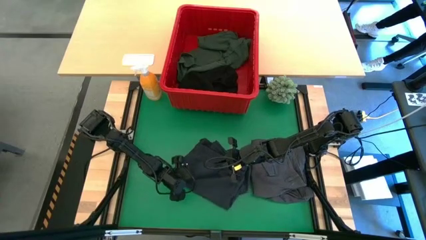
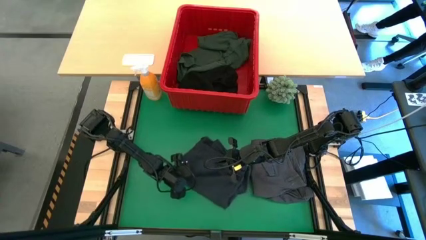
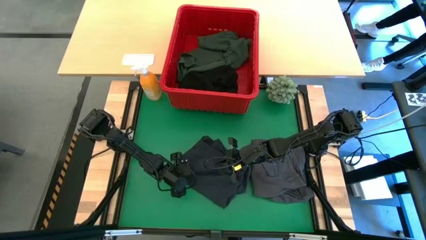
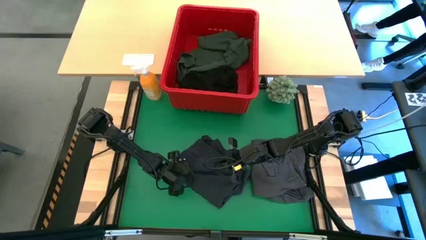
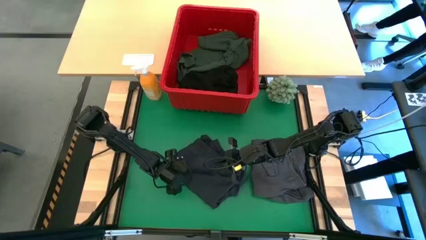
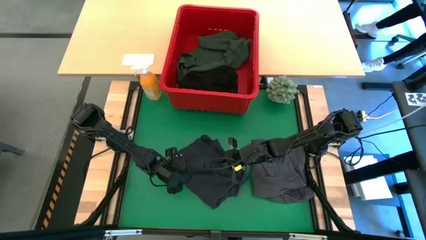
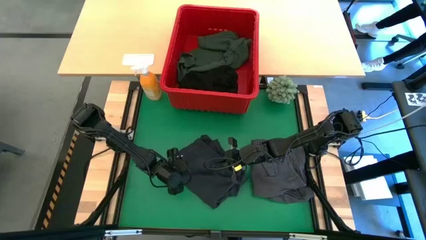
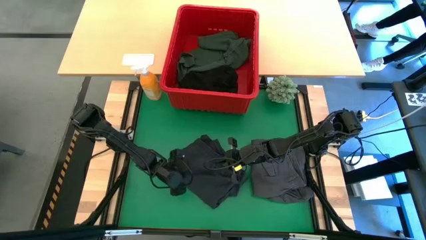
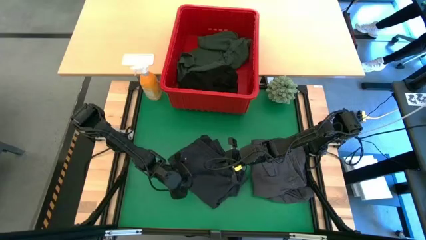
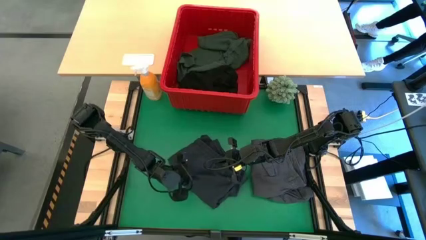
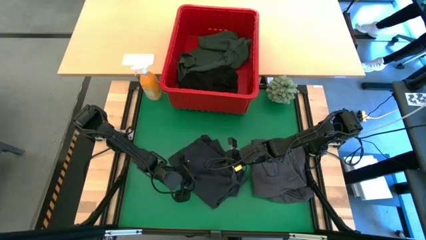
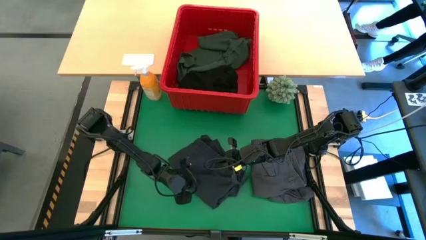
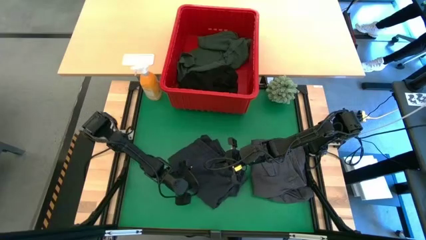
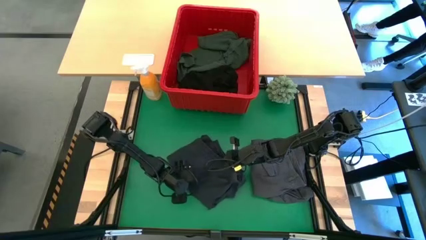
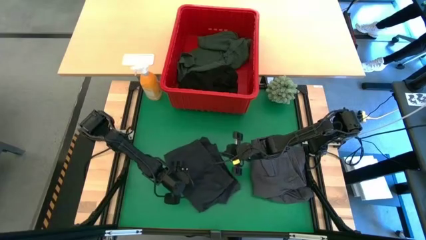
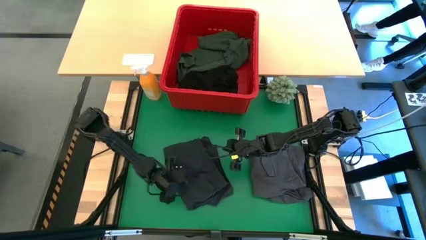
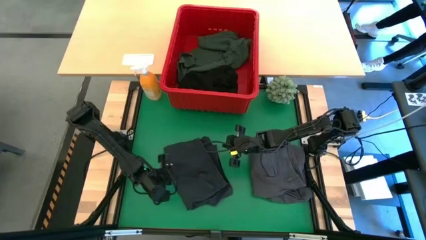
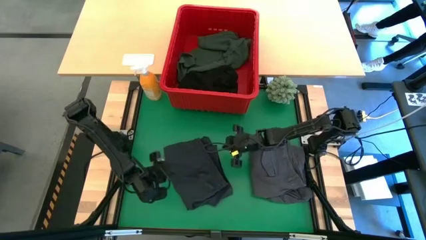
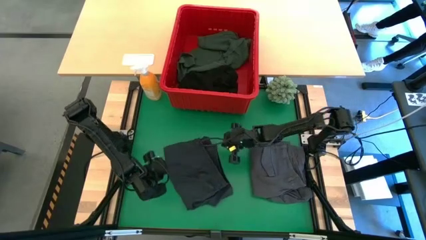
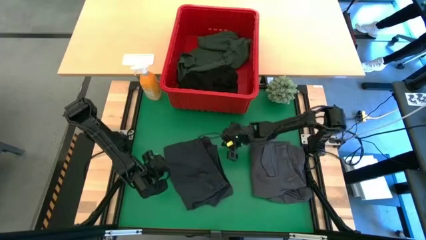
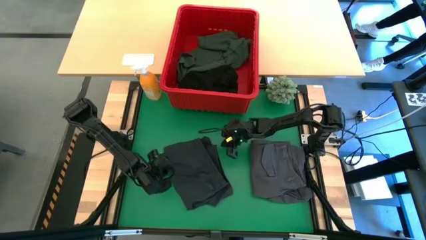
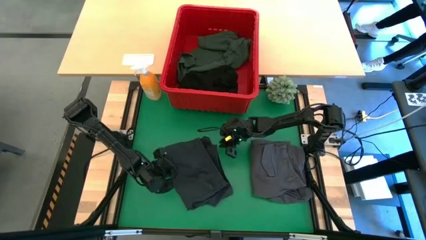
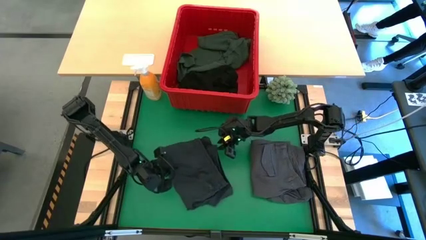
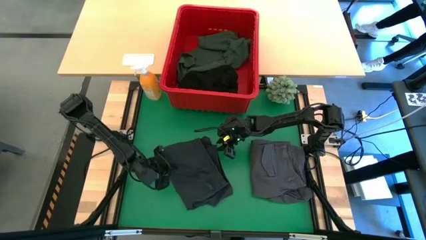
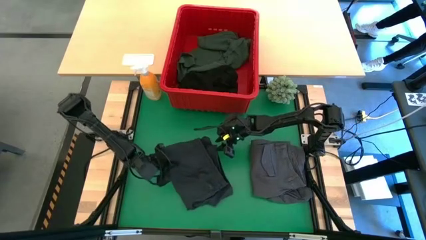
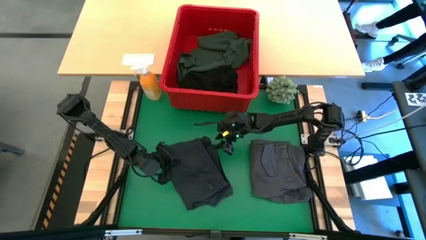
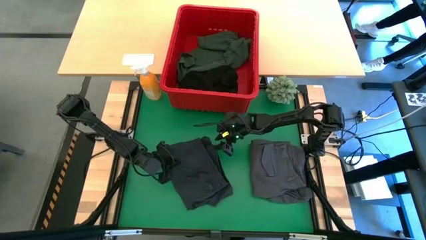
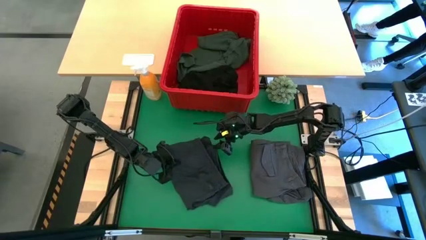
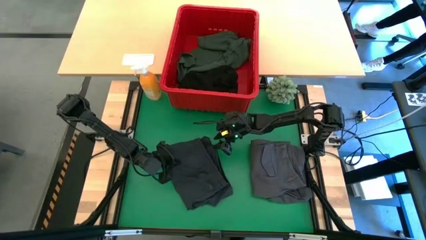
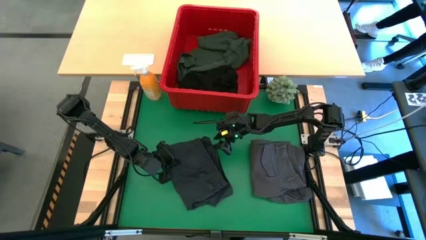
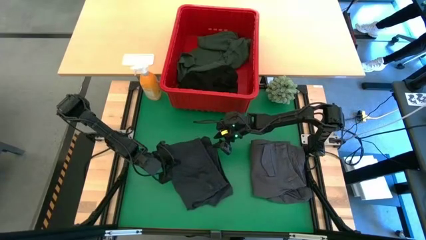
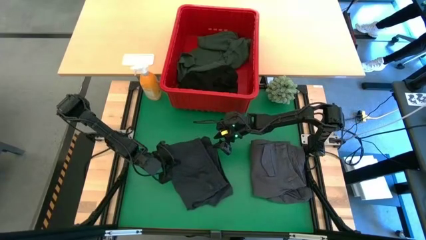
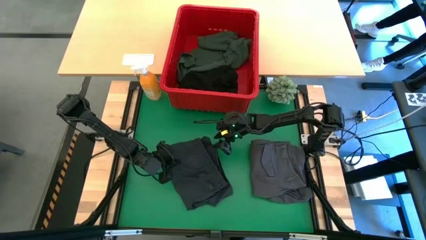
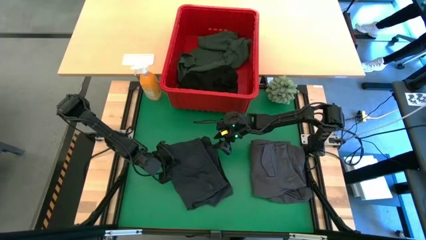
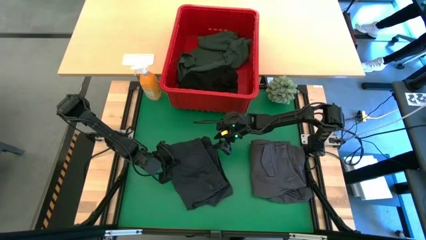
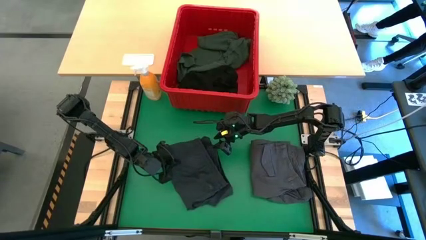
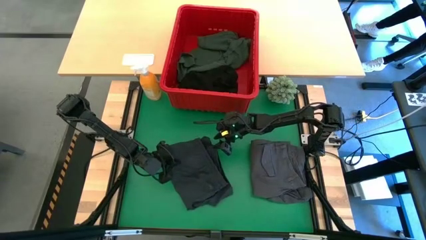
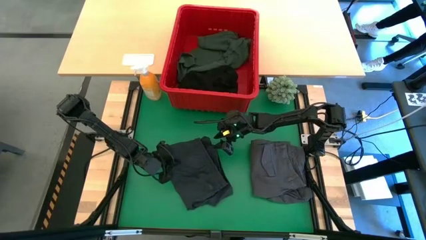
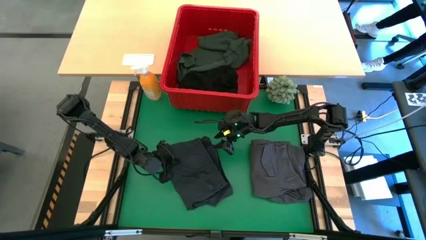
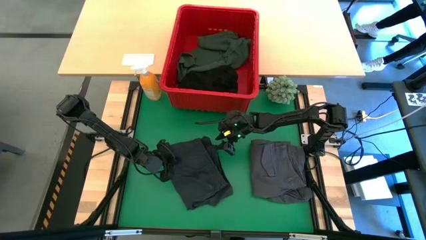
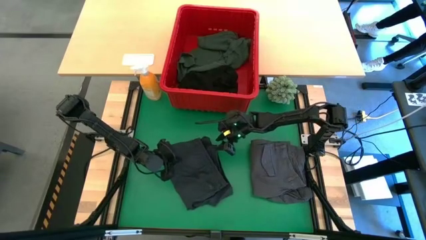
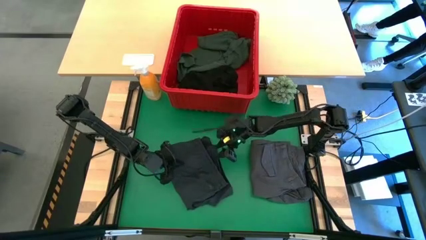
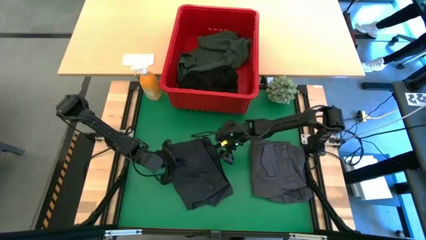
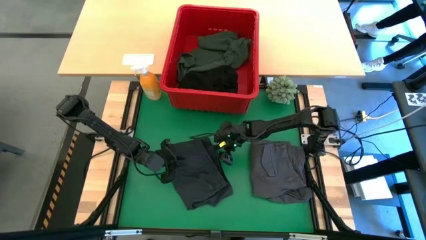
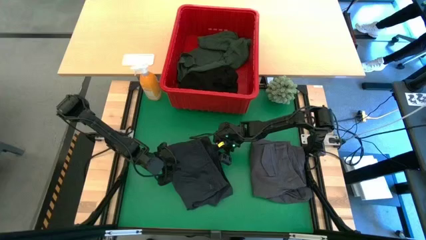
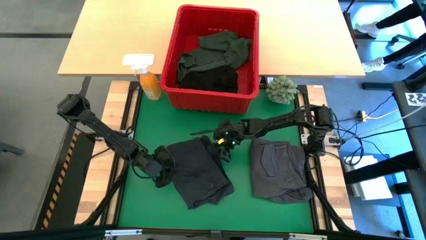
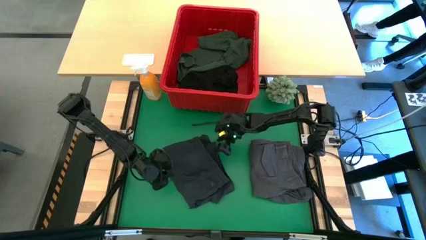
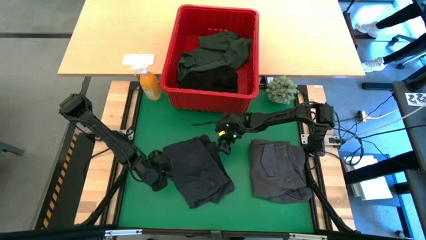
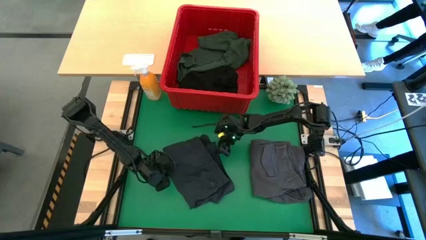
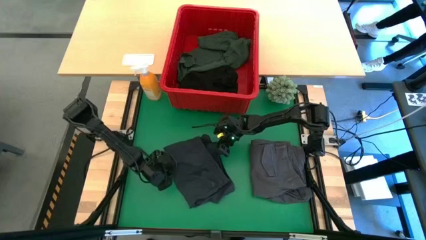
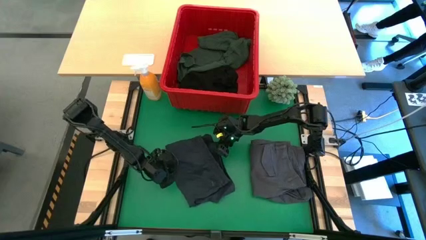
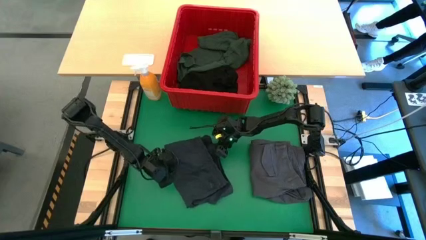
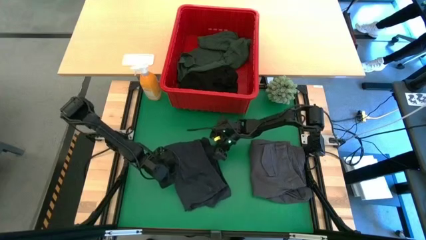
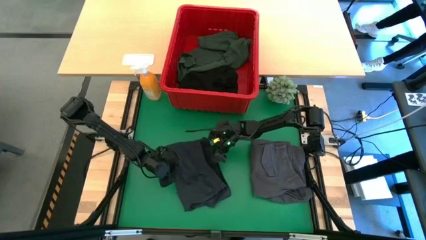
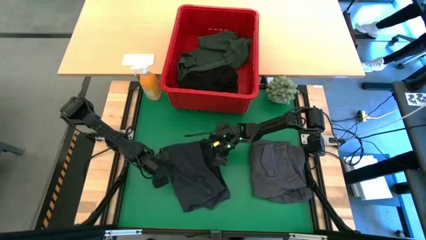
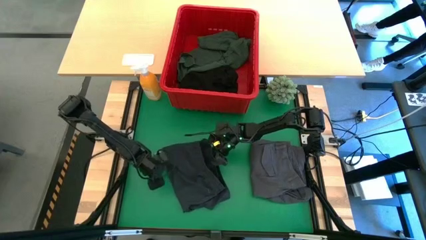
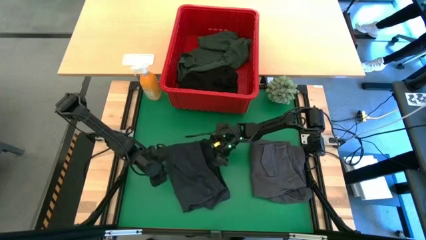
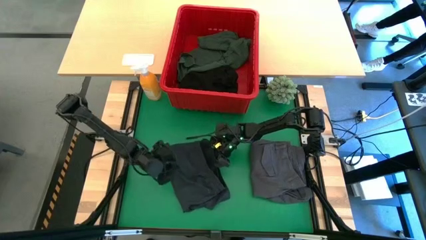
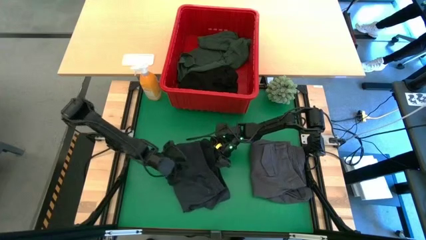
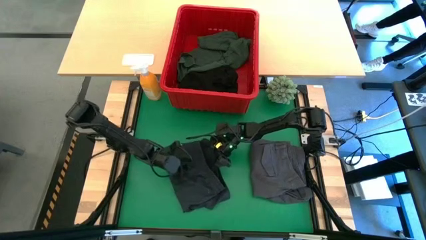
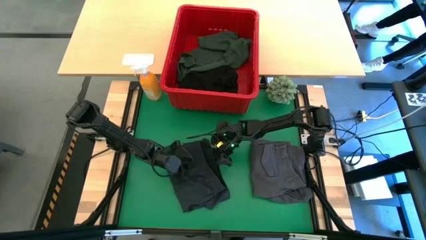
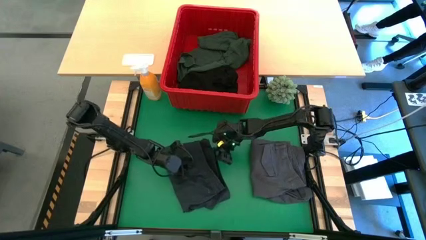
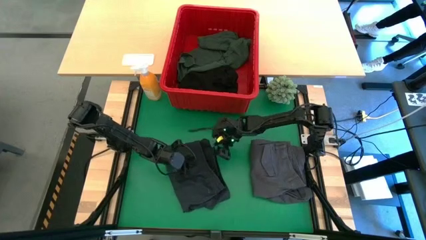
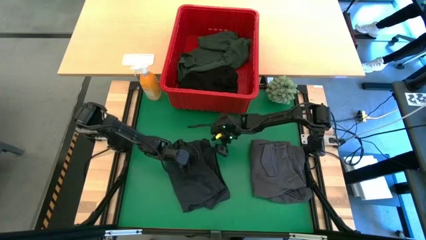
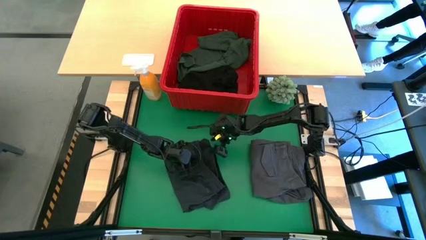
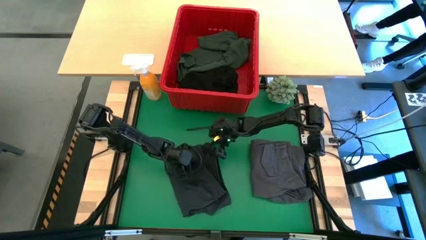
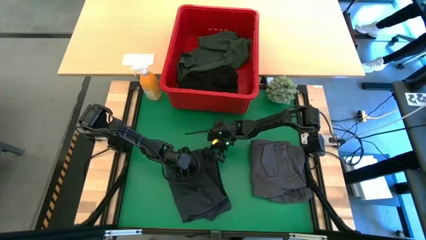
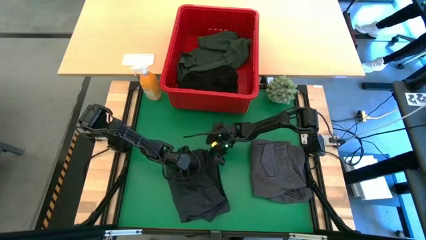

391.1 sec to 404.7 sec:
Task: Fold Laundry from Bin
Stack the dark gray short on top of gray short

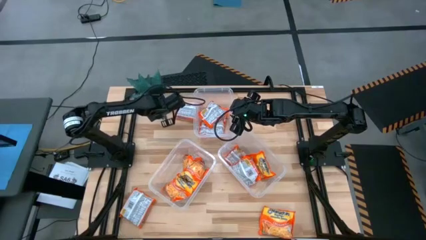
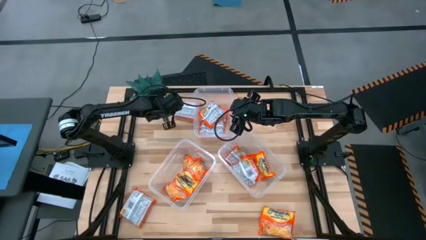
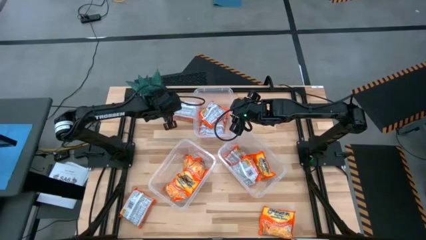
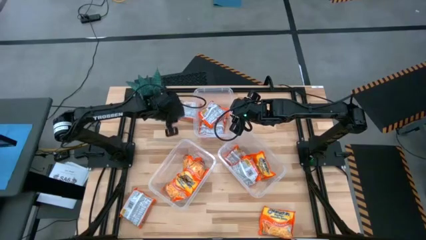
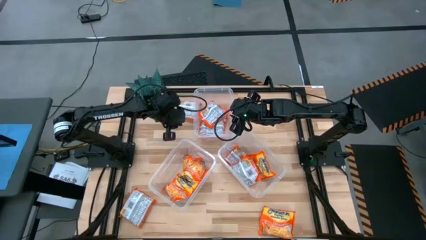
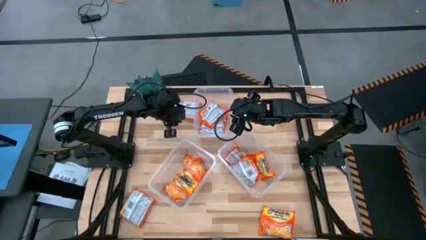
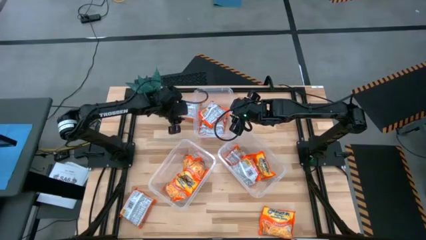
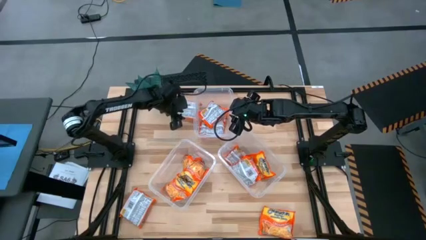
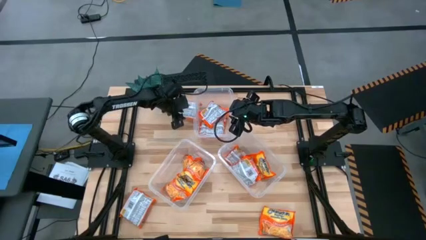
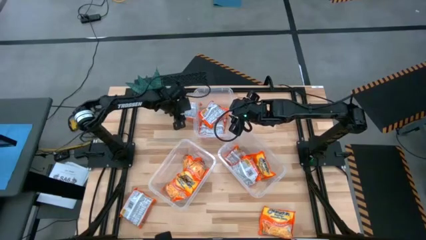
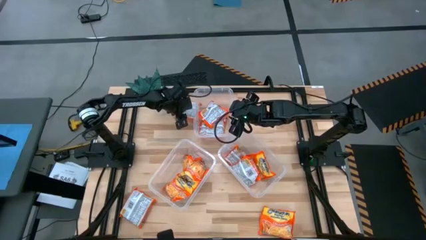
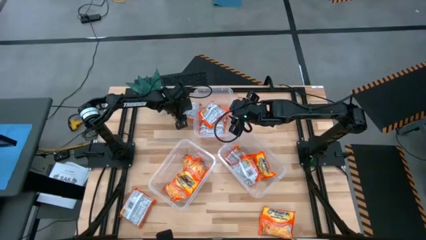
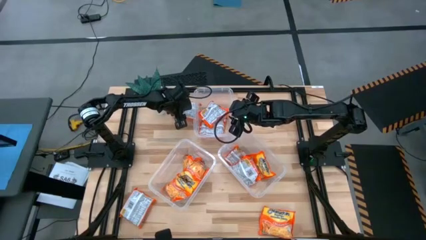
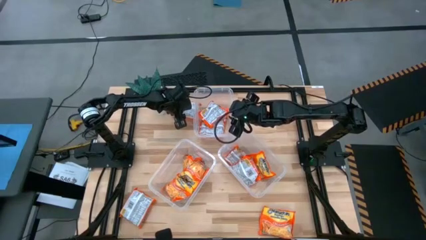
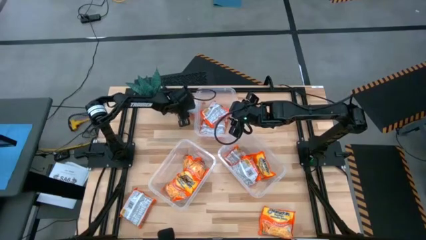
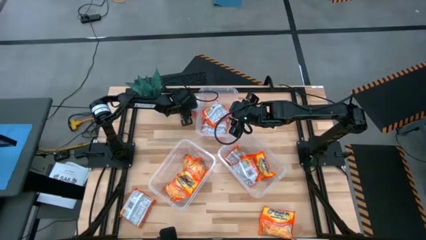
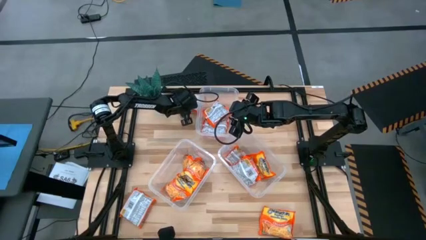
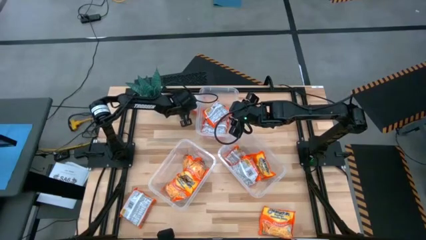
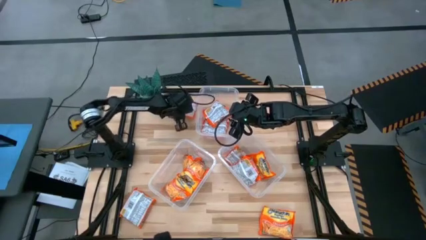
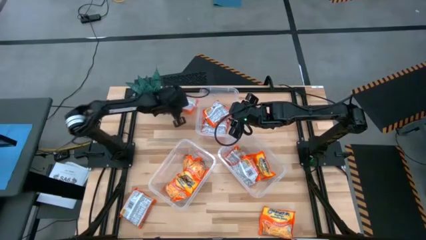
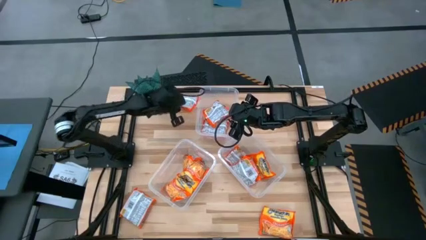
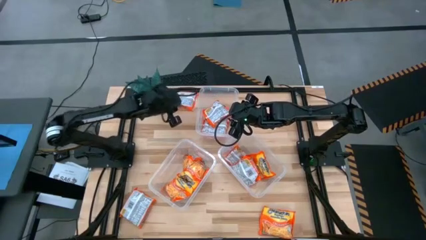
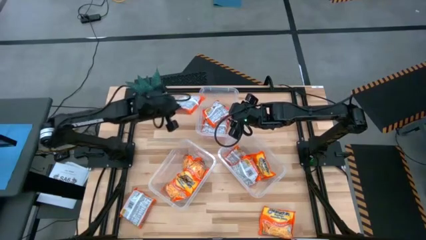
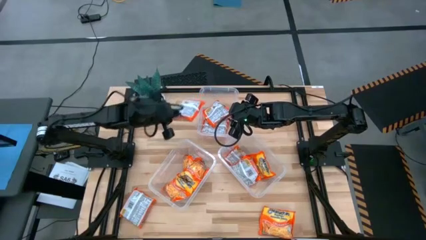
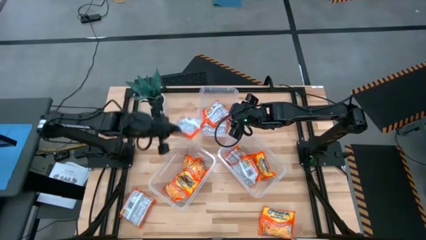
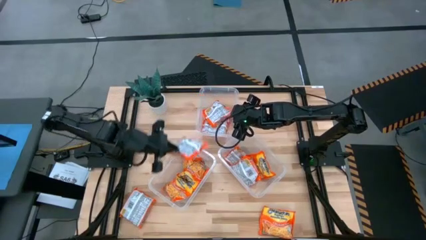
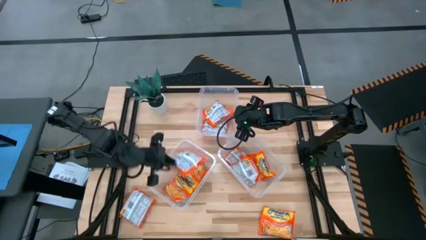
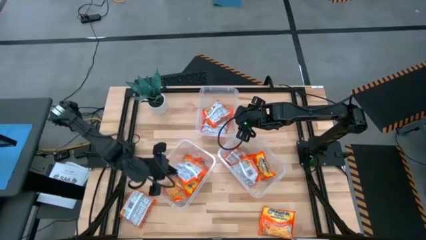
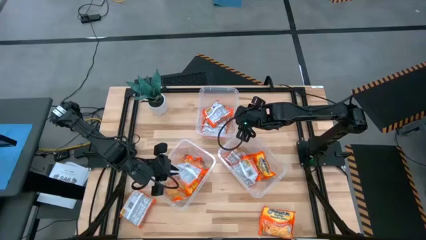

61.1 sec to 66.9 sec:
Task: Sort Maruchan noodles
Put the noodle pack into the bottom left transparent bin
